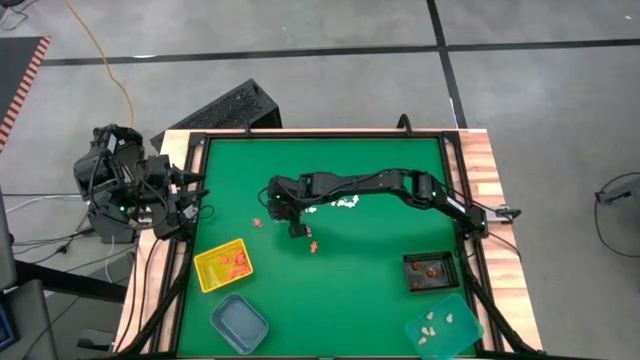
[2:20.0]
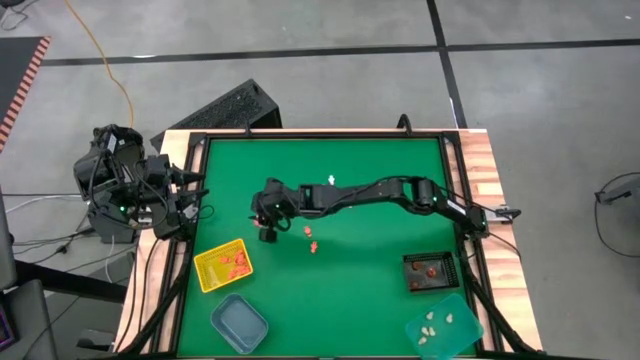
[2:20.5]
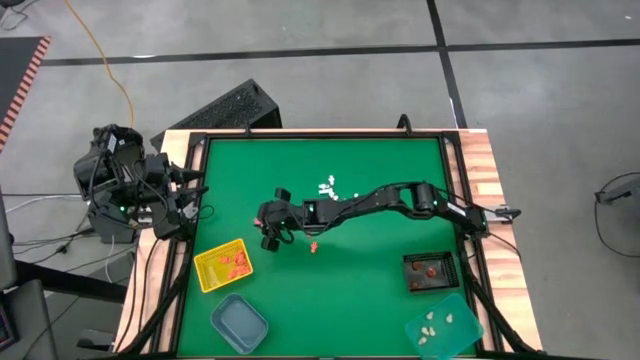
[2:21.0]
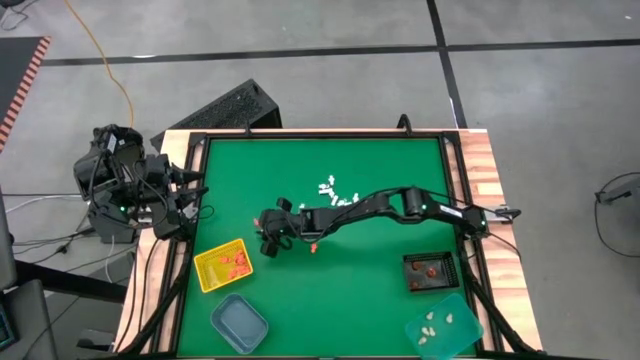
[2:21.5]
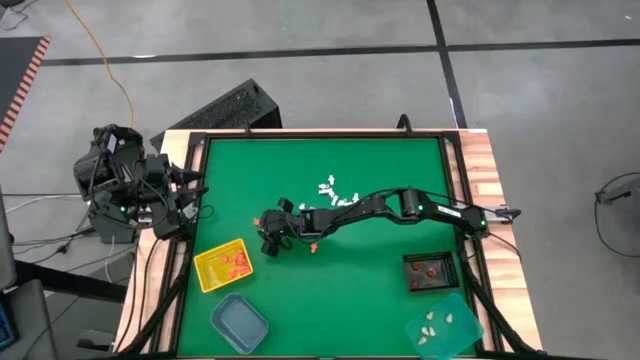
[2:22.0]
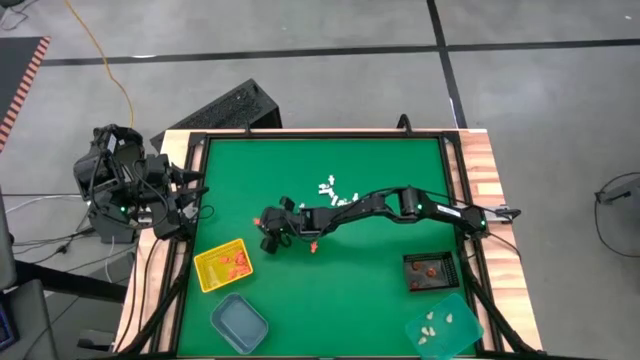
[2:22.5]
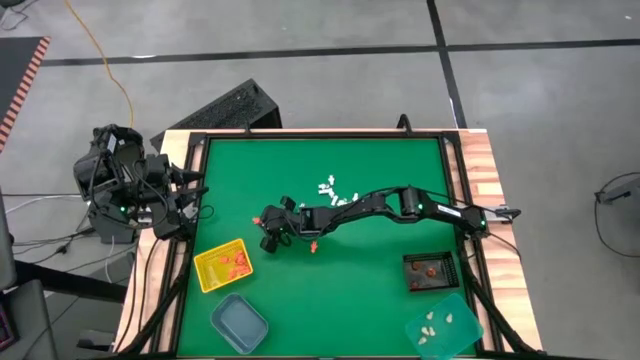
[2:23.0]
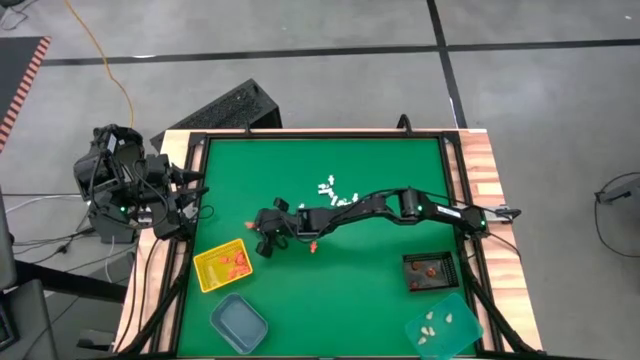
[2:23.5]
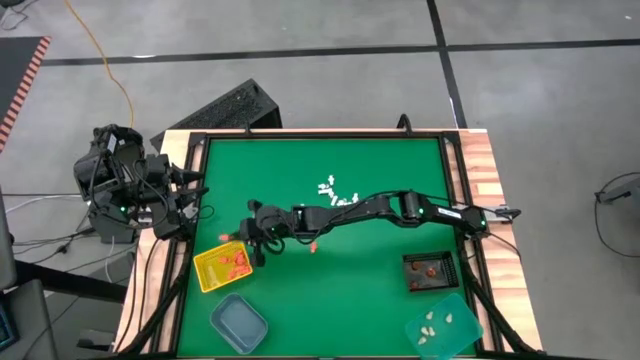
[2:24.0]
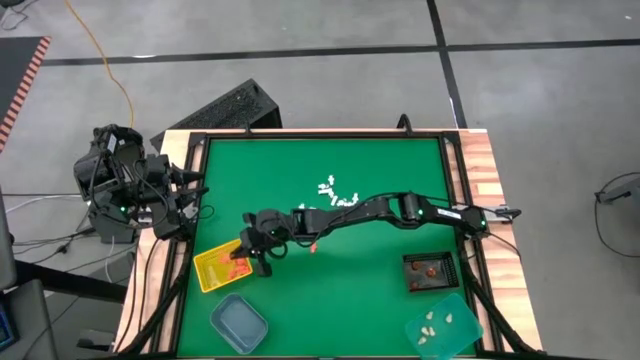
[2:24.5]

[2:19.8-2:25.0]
Task: Sort Halloween decoration
Put the left orange skeleton model into the yellow bin

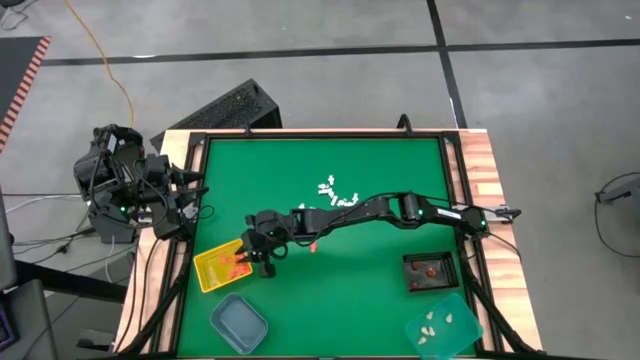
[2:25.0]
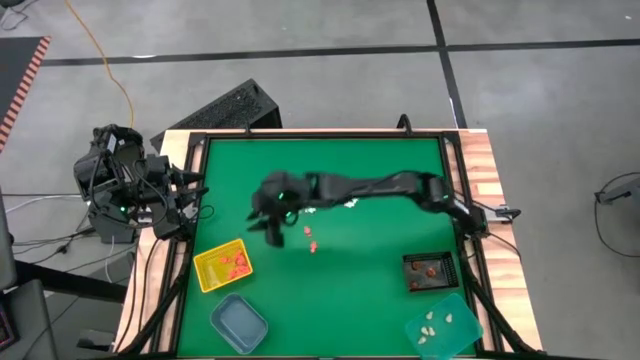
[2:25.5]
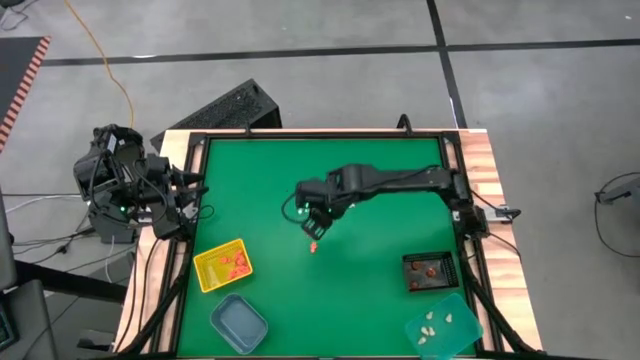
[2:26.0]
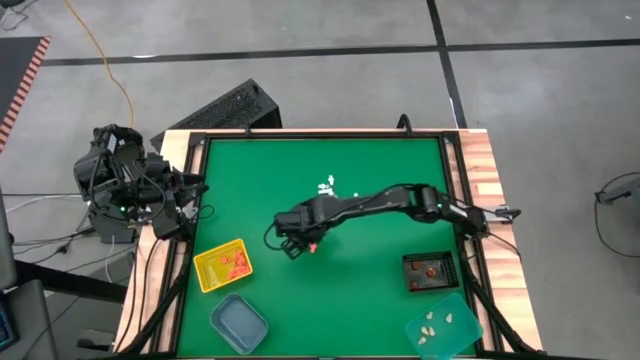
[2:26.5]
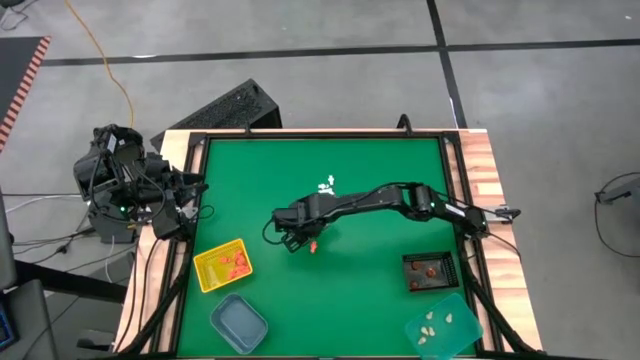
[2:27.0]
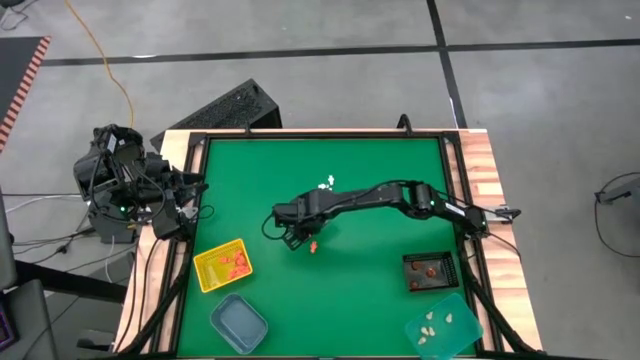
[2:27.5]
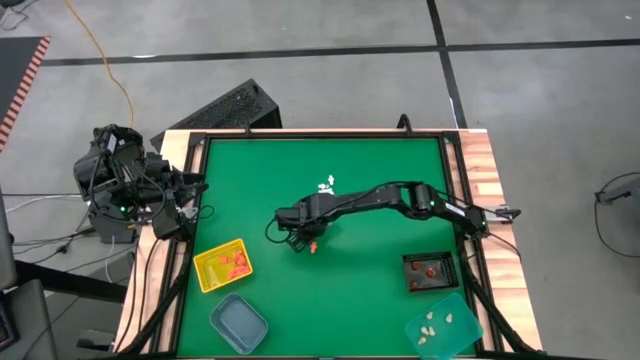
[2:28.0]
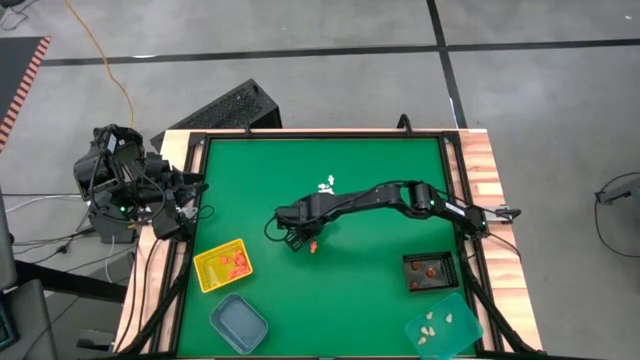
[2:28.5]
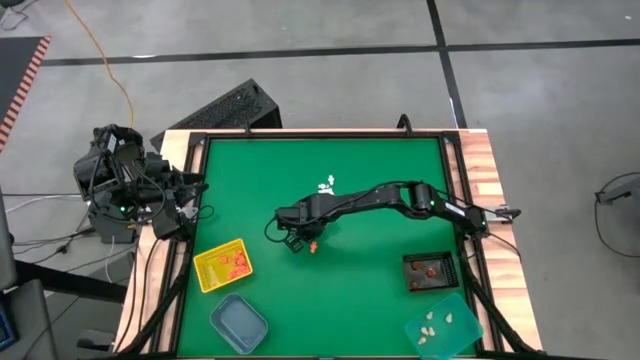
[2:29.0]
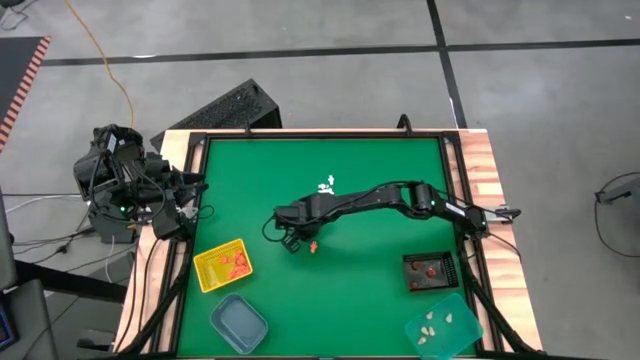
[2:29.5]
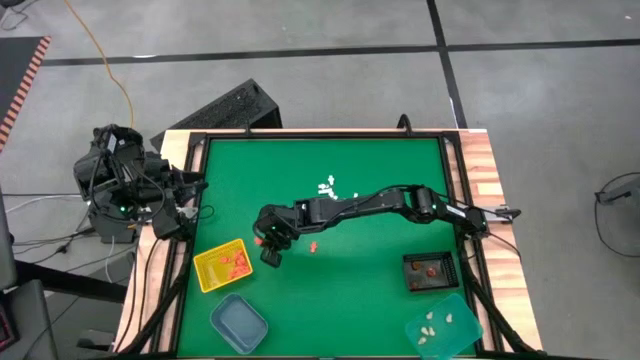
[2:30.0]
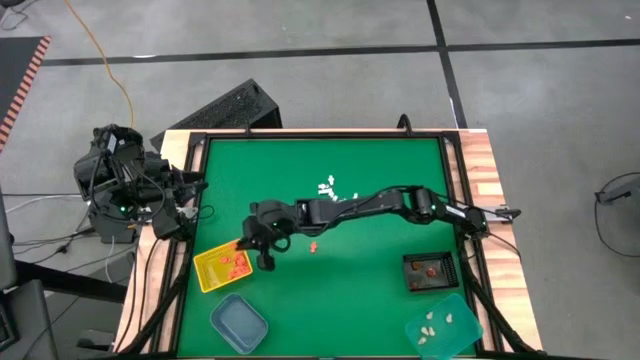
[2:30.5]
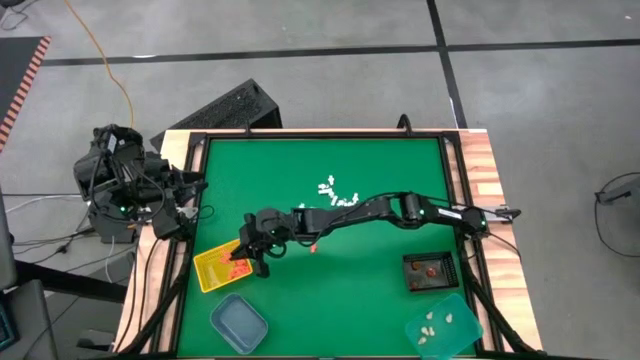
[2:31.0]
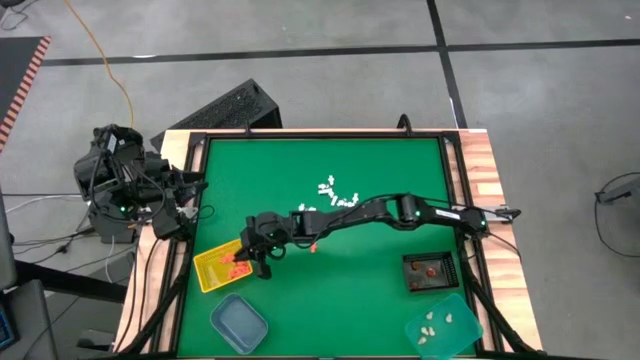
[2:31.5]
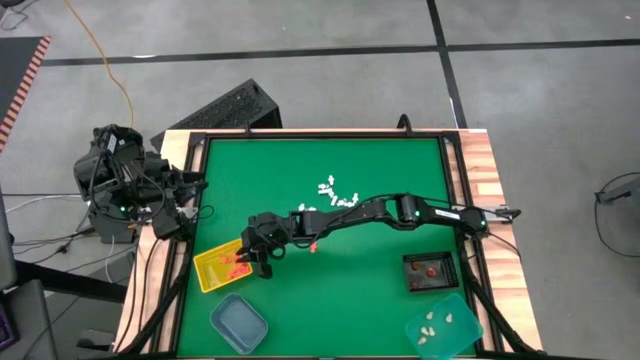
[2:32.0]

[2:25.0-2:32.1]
Put the top orange skeleton model into the yellow bin

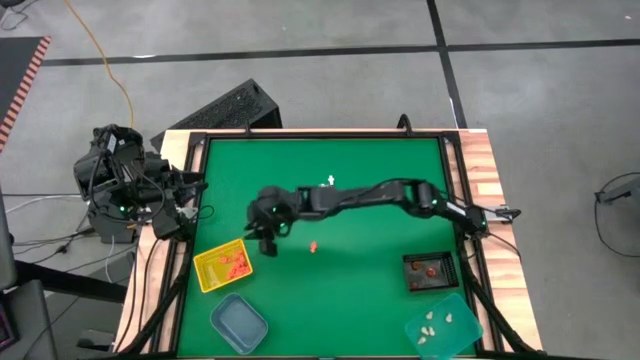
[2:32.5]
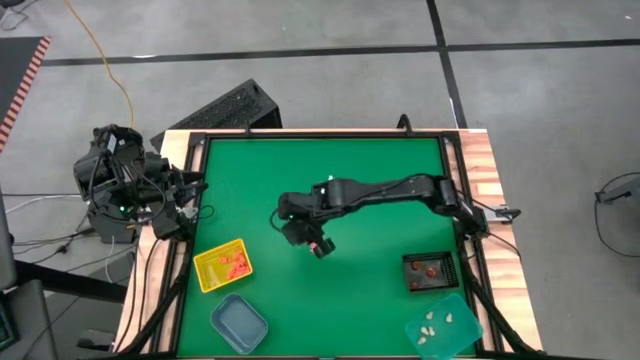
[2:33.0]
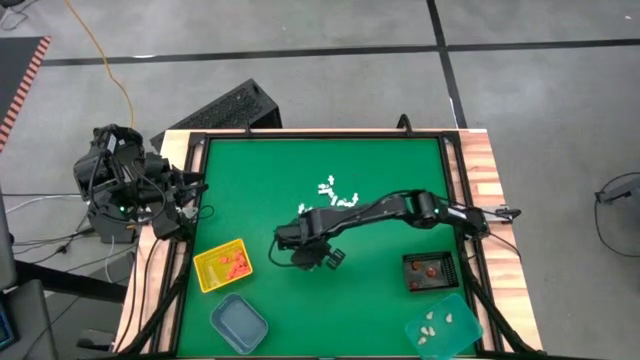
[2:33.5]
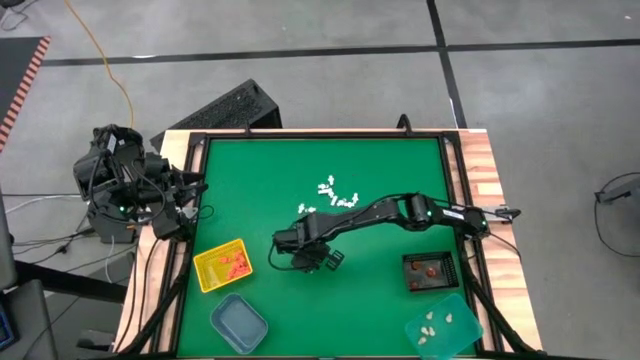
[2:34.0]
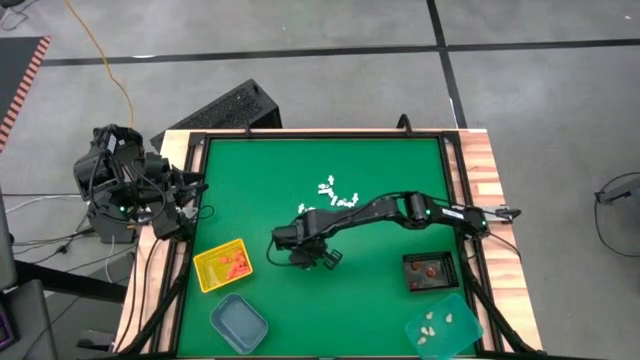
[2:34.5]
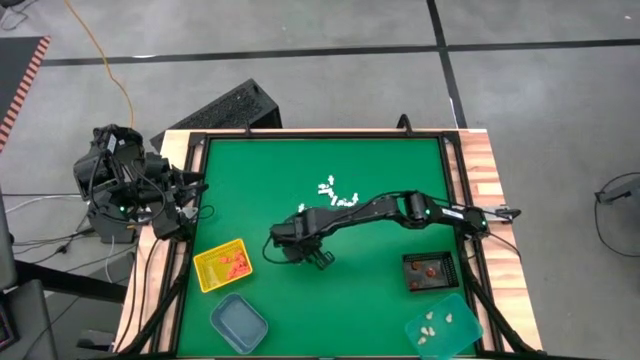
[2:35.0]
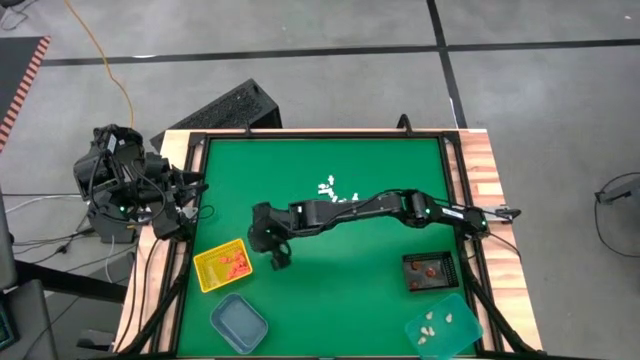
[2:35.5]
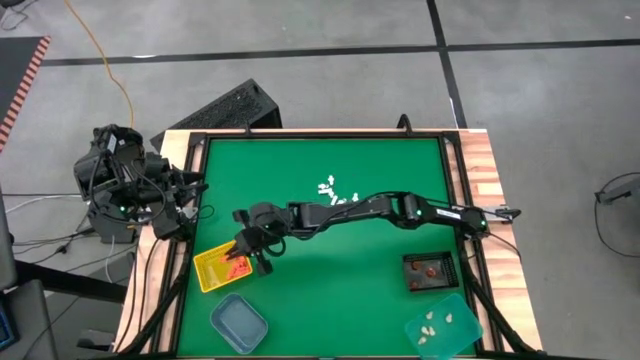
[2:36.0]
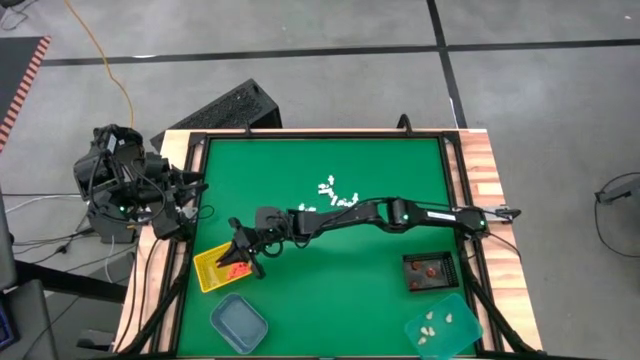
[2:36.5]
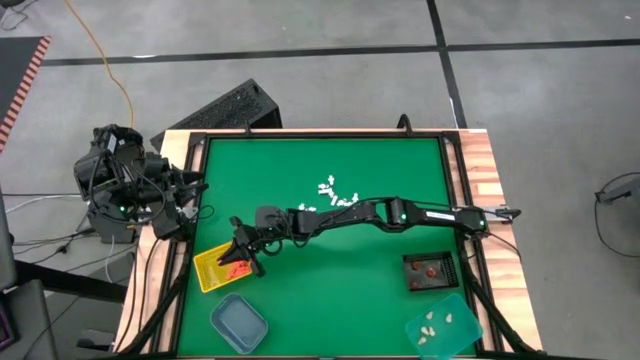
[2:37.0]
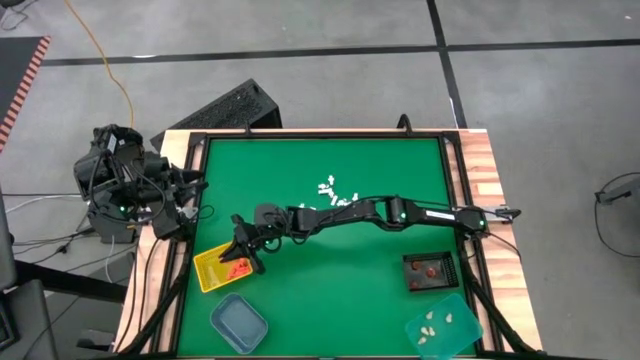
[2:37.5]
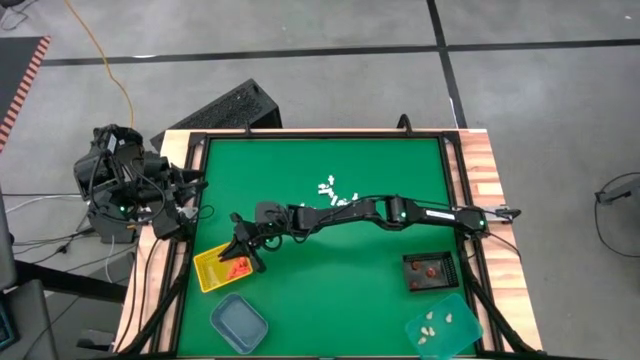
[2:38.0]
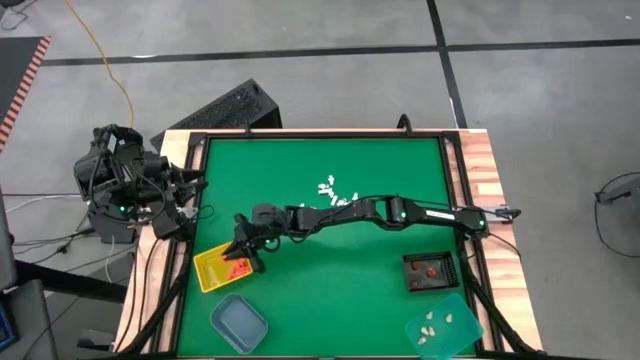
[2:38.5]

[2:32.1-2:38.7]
Put the orange skeleton model into the yellow bin

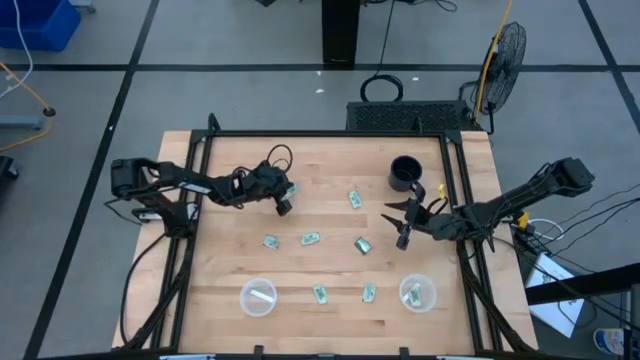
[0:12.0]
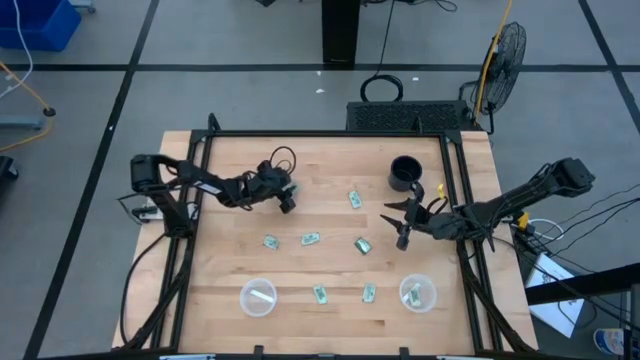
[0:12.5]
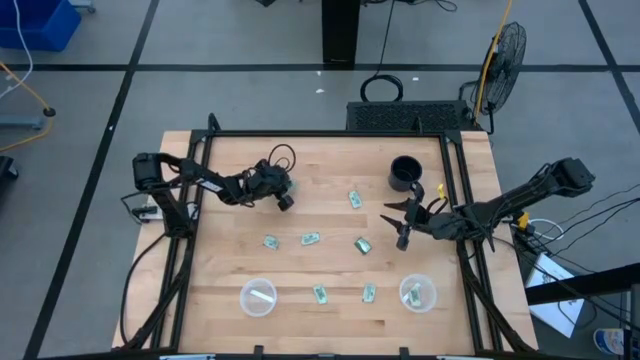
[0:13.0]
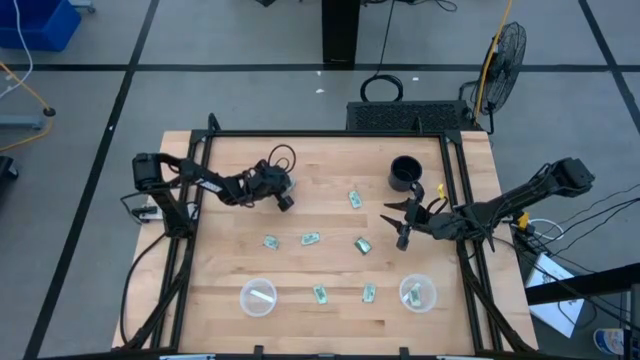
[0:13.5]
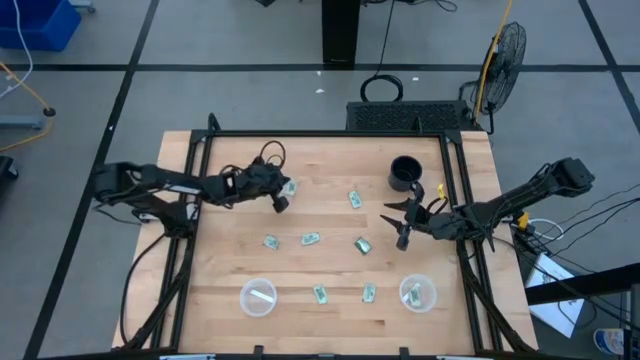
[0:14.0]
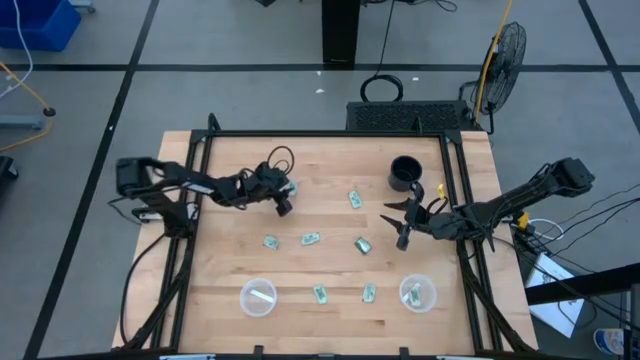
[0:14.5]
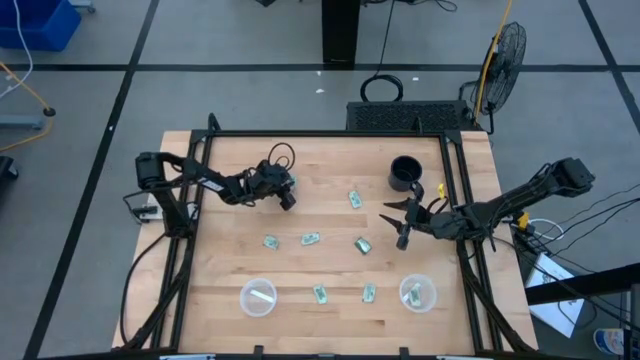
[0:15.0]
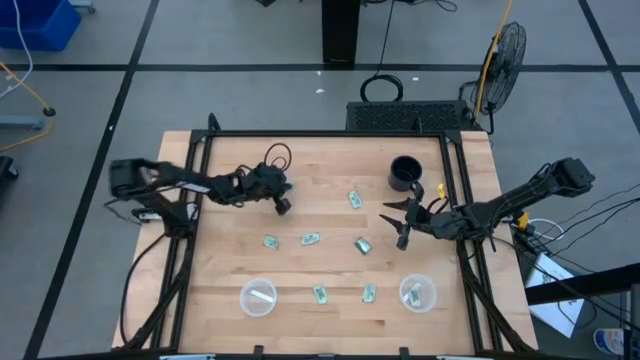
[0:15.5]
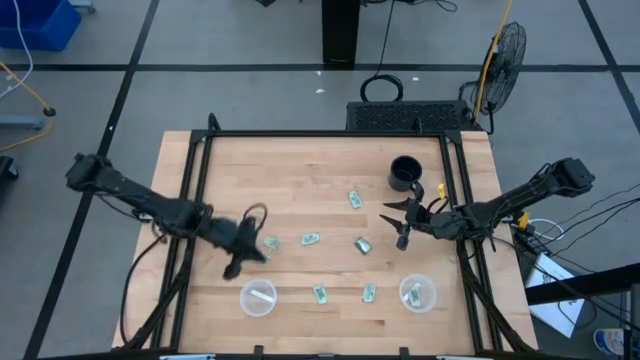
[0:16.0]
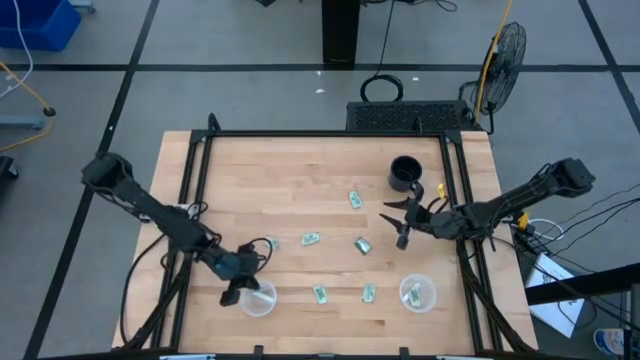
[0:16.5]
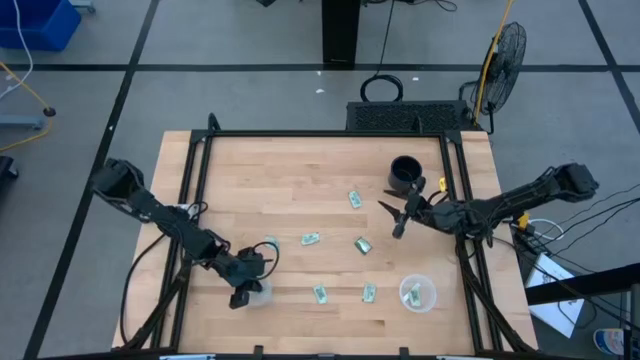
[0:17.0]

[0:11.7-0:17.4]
Task: Pick and place Stevia / Truvia into bins
Put the stevia packet into the left transparent container
